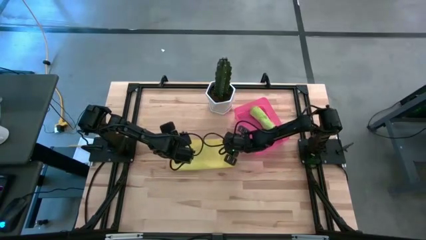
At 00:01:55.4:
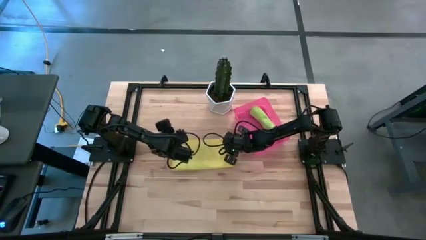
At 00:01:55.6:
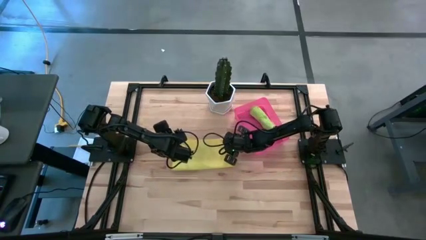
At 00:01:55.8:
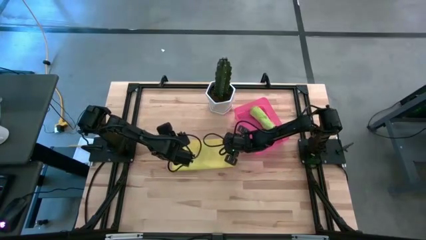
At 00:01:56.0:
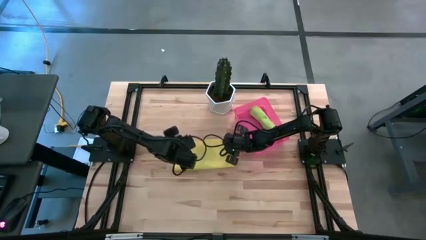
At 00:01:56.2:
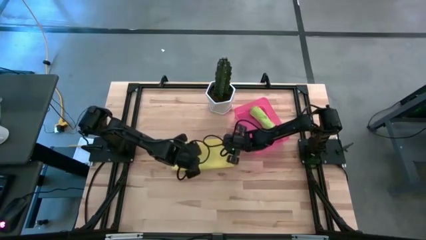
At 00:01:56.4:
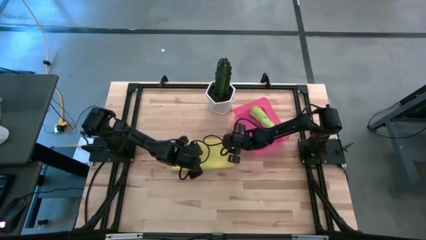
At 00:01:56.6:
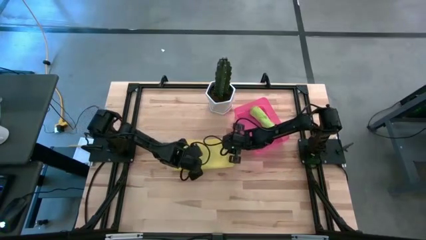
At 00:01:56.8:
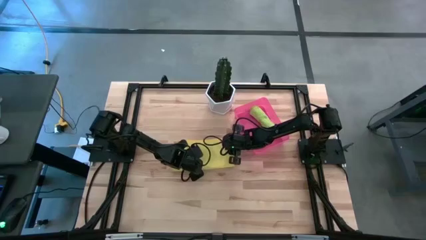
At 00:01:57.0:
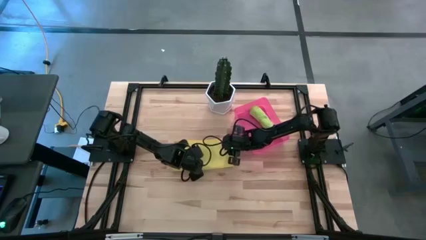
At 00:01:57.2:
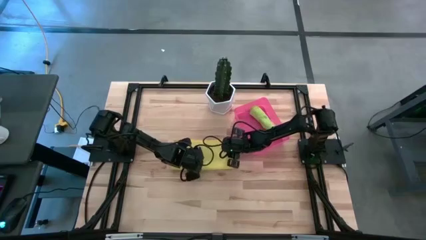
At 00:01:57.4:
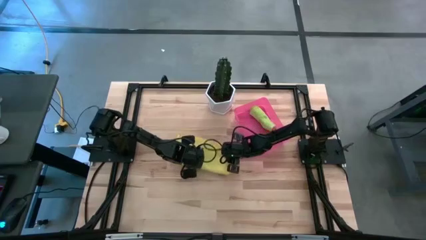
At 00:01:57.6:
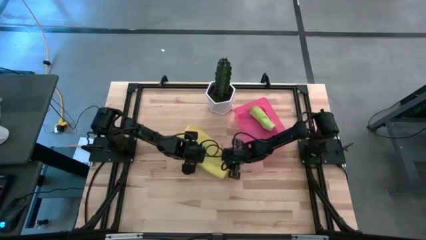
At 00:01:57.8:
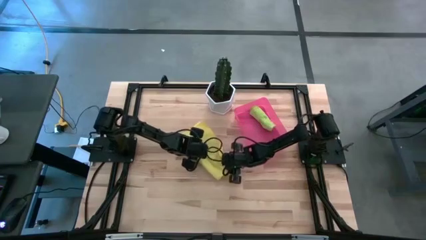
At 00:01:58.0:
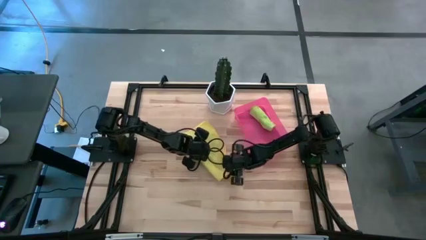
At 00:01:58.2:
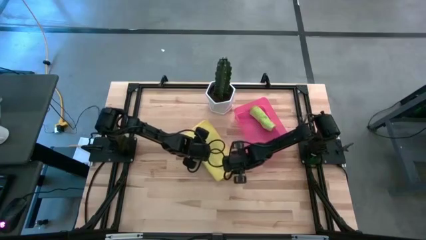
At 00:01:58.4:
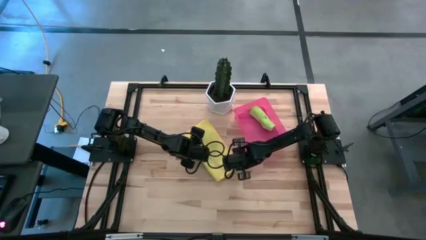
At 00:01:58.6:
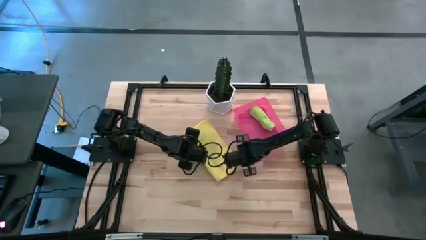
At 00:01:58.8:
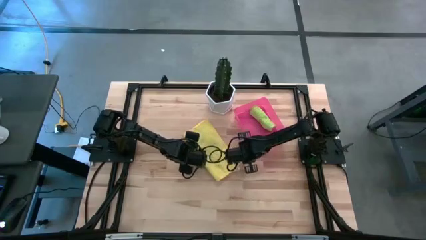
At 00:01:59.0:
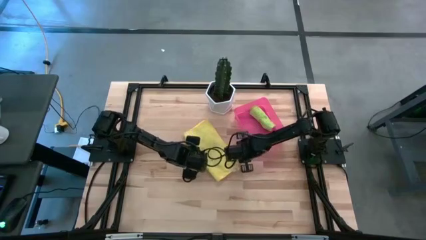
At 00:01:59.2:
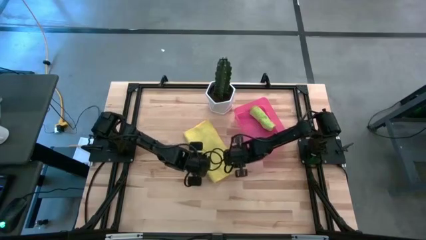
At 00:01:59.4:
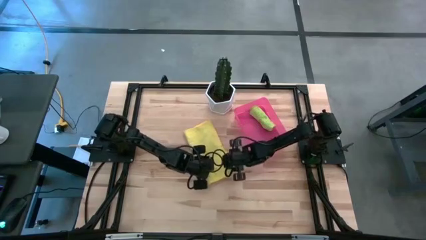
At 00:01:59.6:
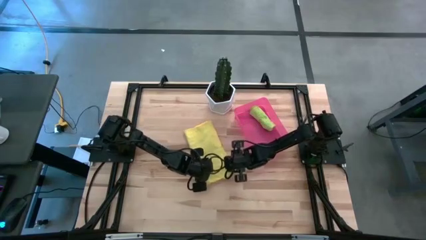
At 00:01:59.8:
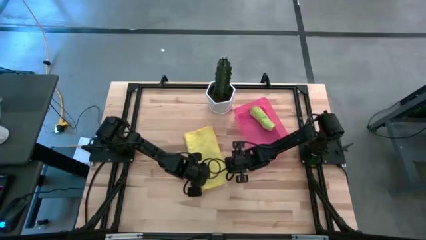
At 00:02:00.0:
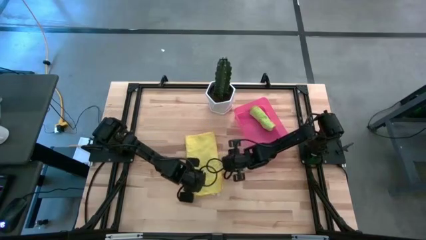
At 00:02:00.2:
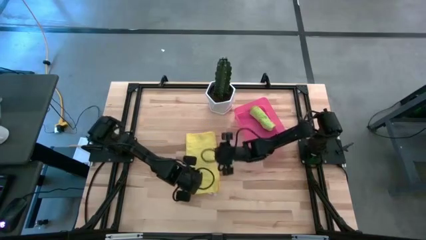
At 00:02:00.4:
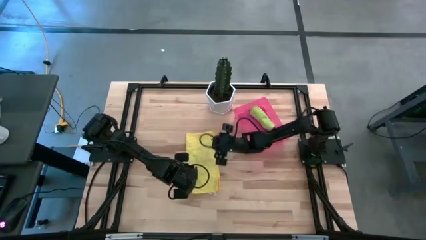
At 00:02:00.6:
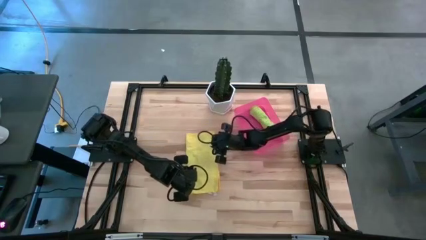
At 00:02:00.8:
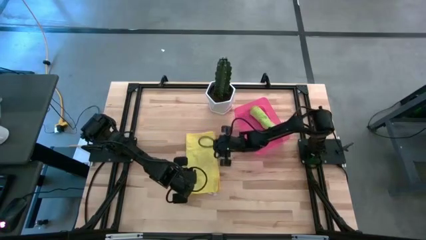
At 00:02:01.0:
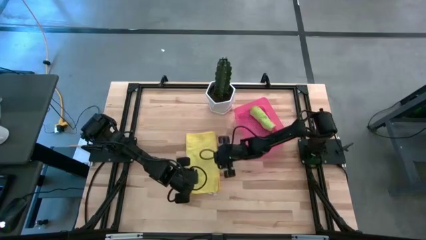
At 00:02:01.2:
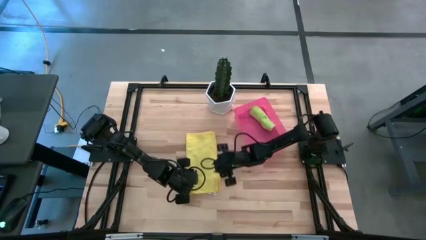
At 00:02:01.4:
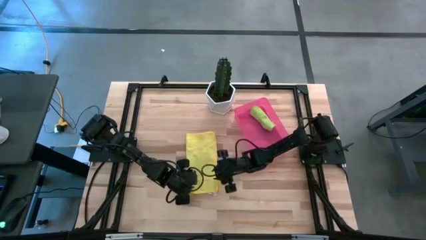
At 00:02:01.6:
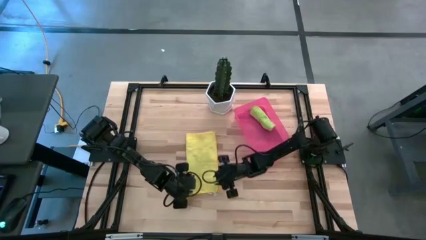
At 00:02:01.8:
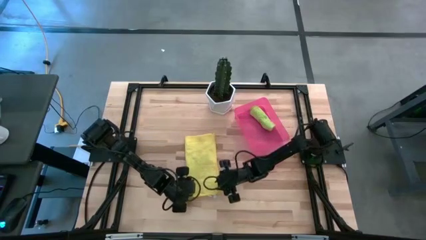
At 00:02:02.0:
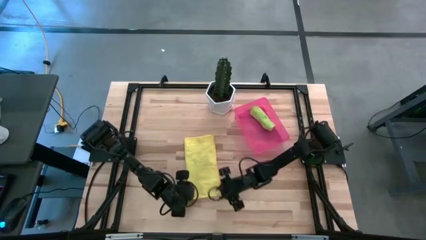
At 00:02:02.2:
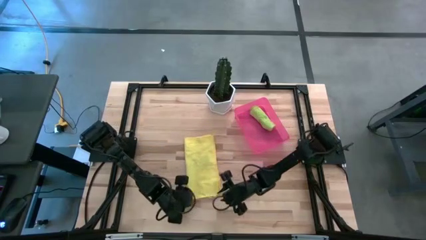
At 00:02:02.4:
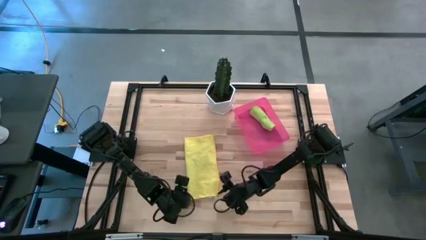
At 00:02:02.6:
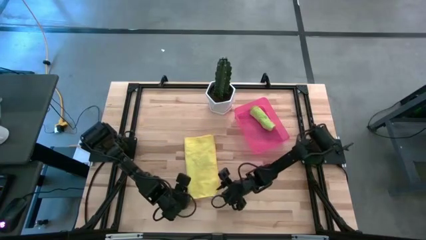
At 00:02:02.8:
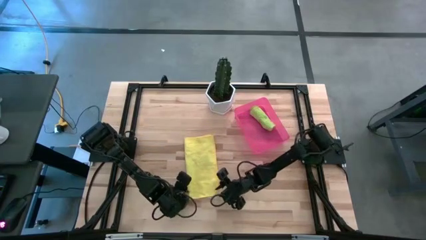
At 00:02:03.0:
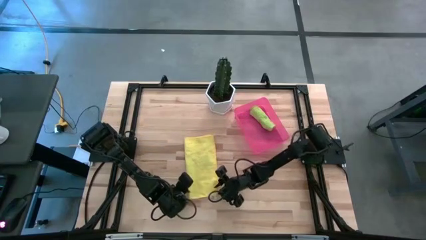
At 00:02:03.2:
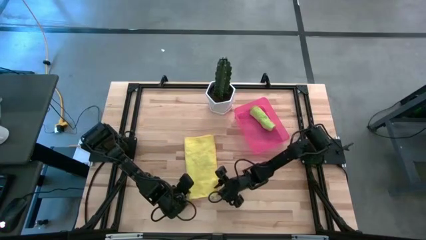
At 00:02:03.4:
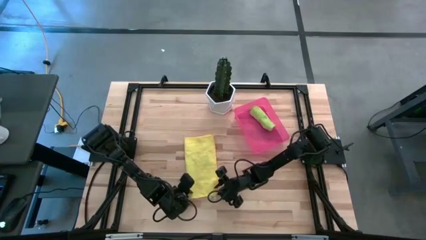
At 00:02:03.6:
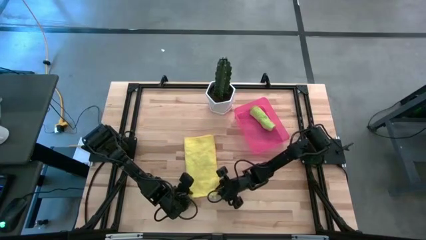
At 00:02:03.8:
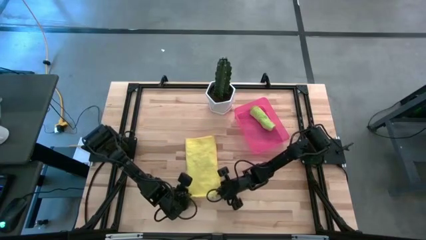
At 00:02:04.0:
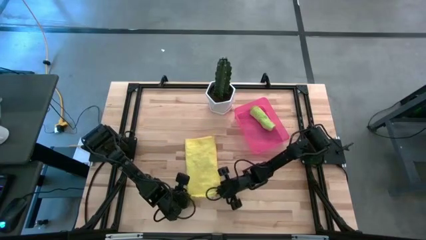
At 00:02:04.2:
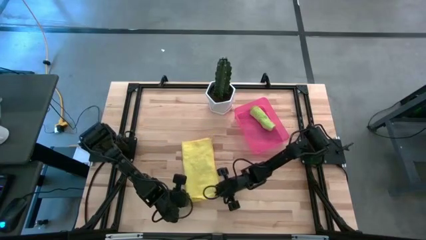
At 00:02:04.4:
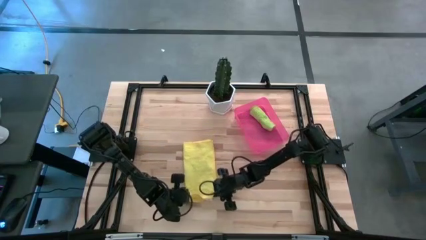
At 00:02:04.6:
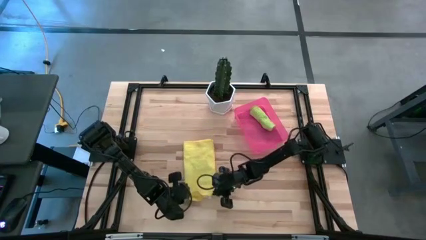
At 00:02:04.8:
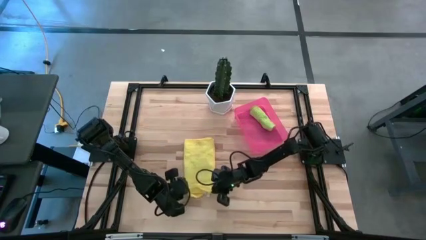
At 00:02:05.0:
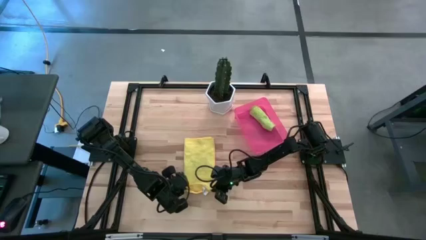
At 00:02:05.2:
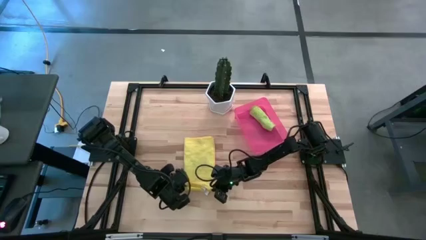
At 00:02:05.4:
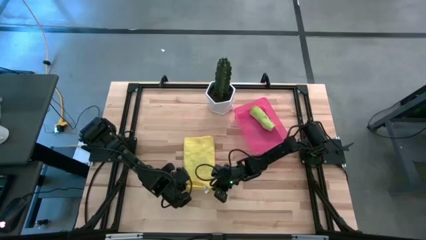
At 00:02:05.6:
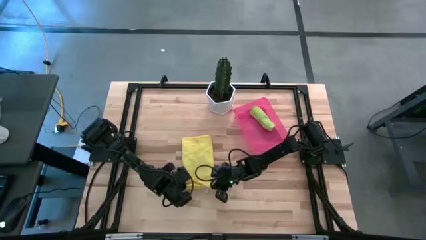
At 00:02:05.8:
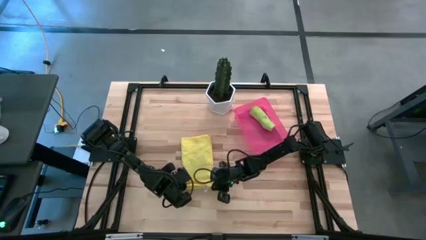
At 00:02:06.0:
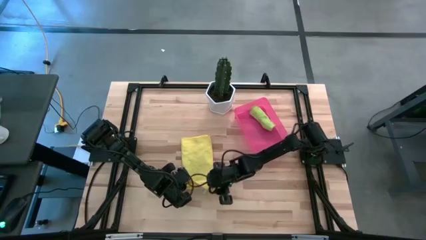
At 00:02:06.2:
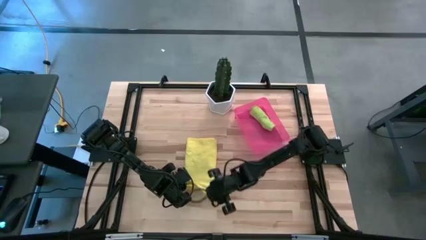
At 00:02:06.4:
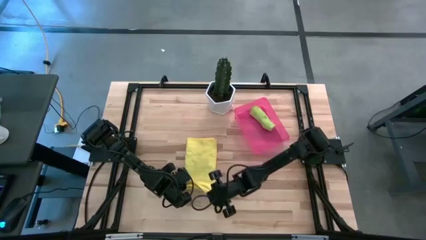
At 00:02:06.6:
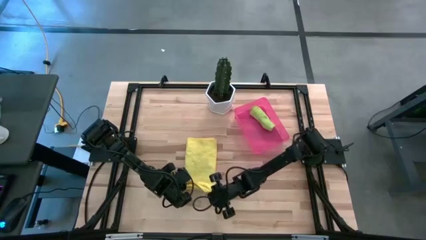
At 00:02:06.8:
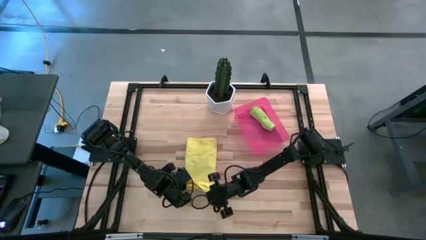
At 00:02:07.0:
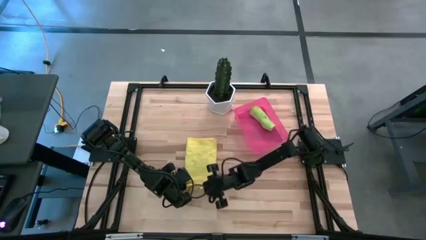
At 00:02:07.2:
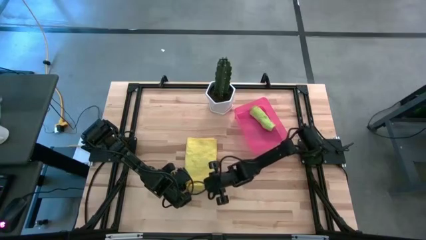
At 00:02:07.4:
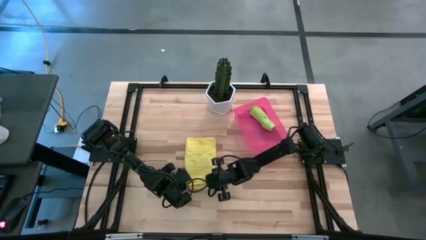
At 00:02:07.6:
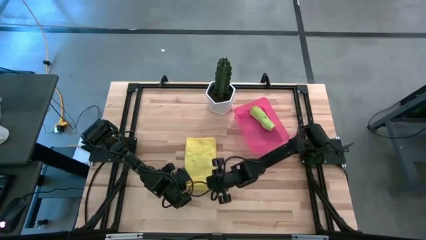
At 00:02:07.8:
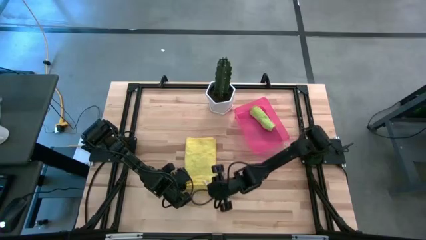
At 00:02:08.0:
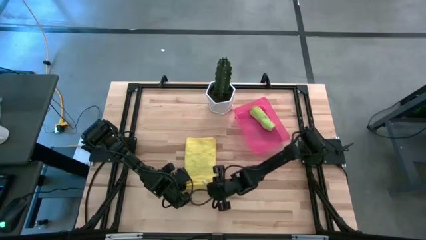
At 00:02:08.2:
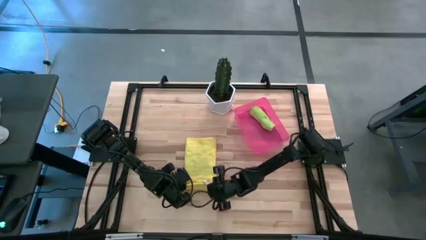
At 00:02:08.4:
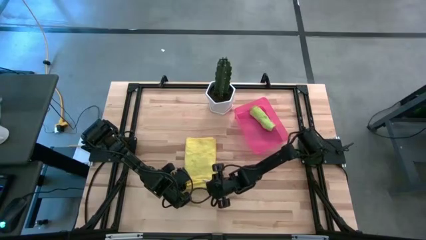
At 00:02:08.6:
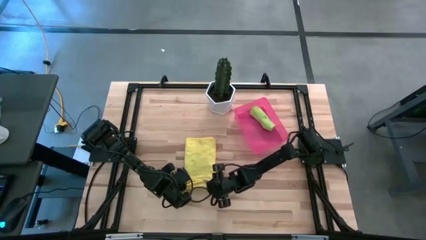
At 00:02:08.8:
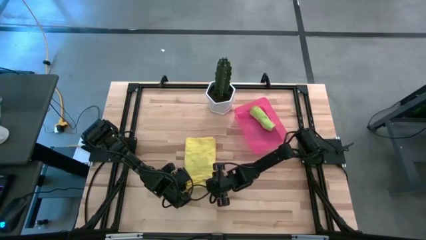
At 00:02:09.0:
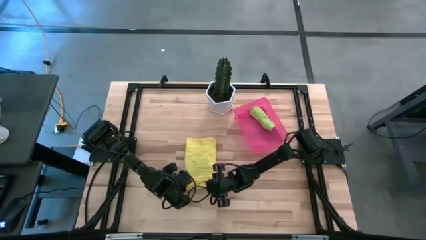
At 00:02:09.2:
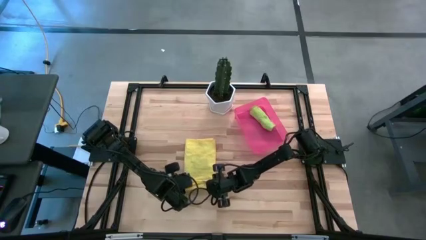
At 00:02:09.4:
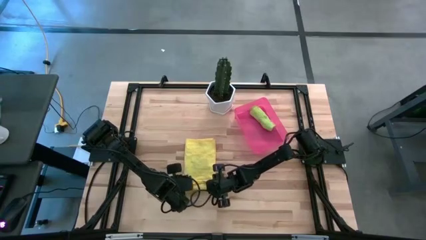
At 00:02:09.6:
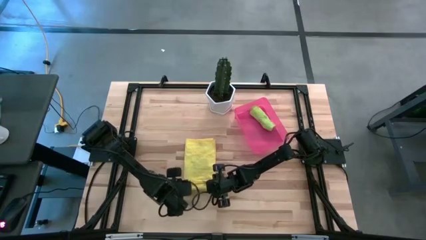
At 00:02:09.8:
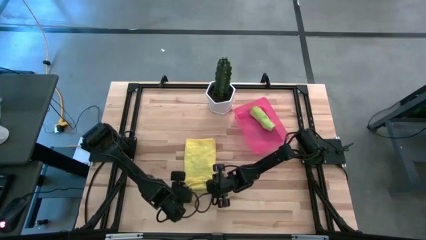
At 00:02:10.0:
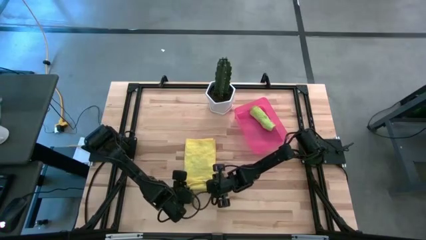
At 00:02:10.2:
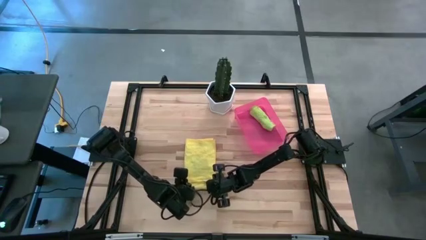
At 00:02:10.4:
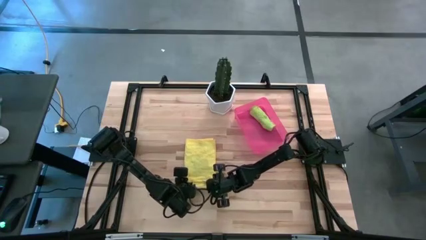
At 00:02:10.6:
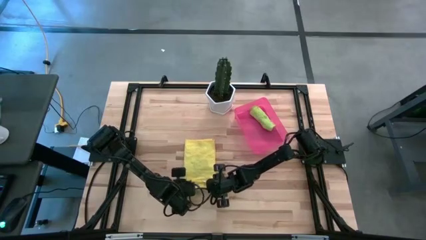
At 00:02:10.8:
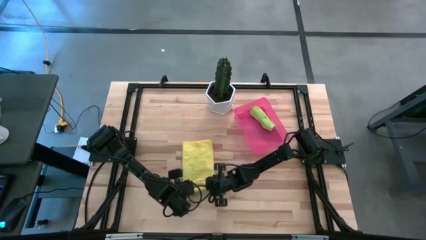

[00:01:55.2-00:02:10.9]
Task: Roll microfiber towels into tight, uniform cylinder then place into a basket
Roll the yellow towel
